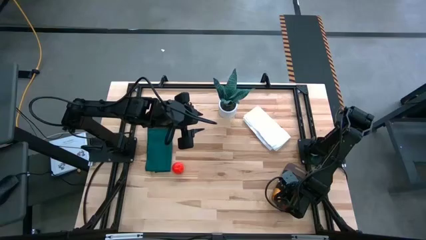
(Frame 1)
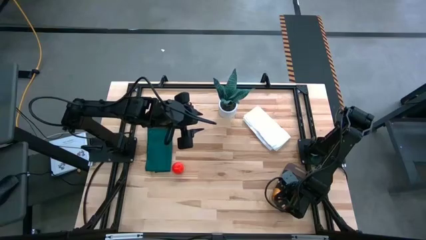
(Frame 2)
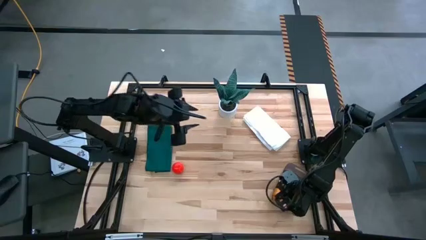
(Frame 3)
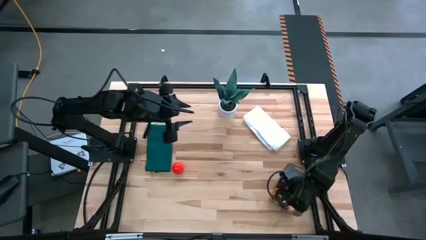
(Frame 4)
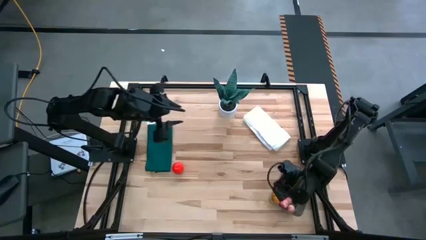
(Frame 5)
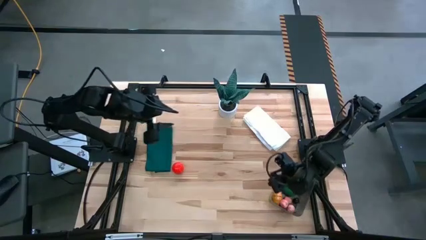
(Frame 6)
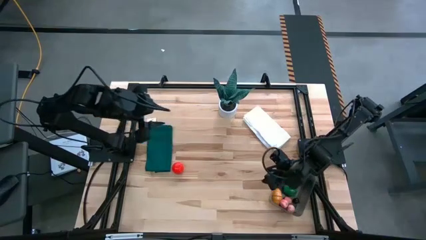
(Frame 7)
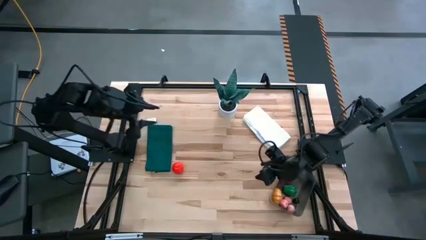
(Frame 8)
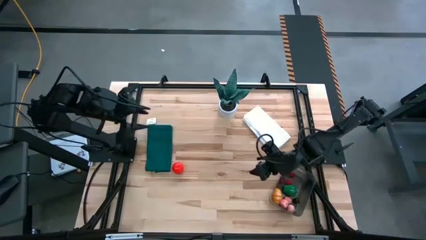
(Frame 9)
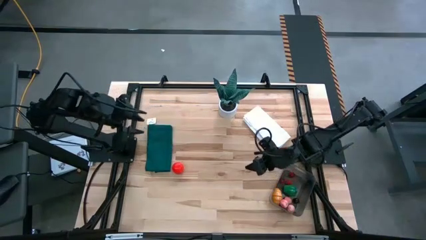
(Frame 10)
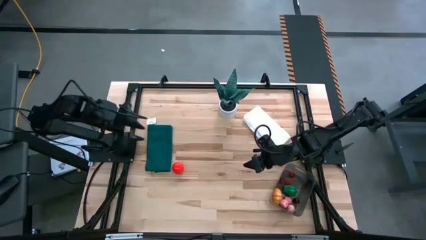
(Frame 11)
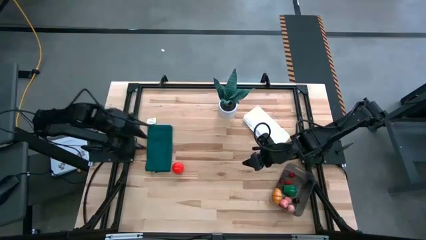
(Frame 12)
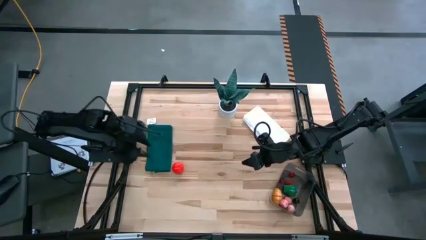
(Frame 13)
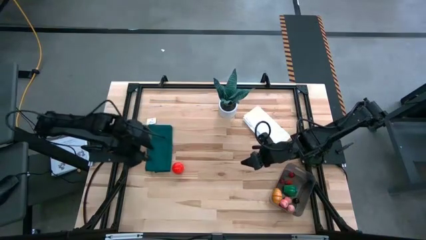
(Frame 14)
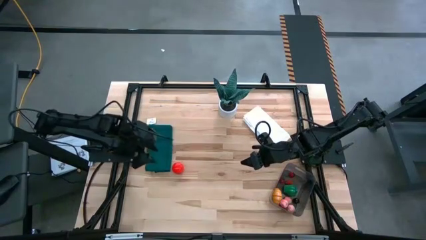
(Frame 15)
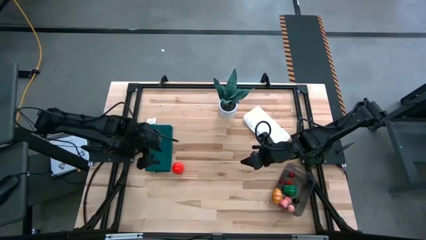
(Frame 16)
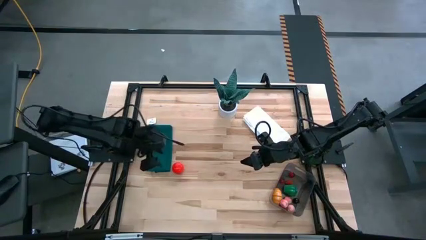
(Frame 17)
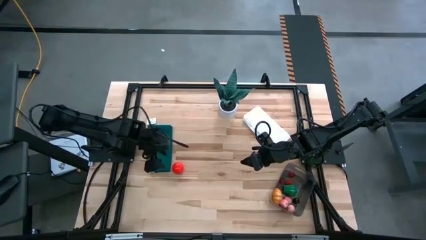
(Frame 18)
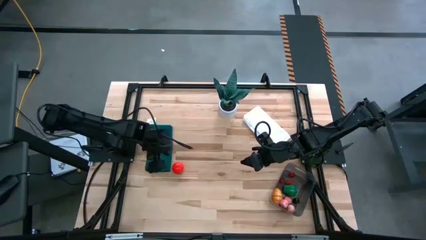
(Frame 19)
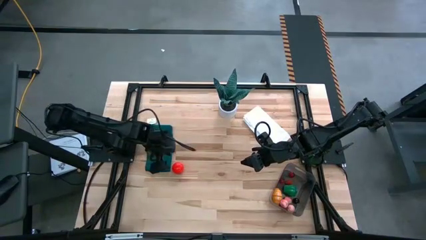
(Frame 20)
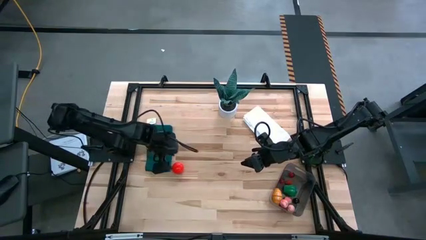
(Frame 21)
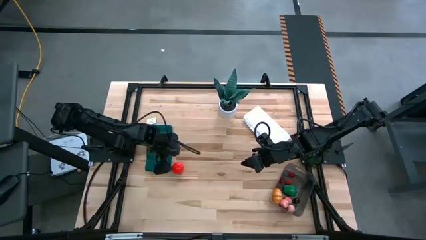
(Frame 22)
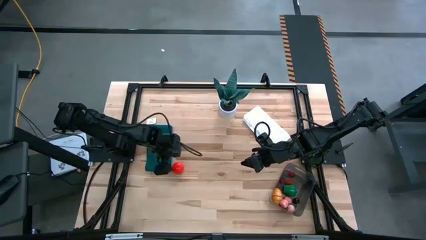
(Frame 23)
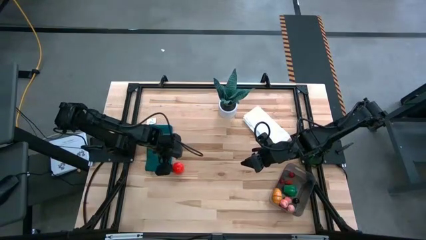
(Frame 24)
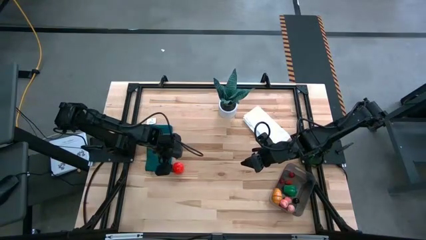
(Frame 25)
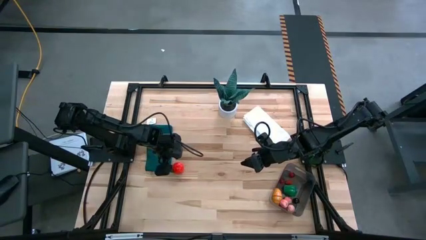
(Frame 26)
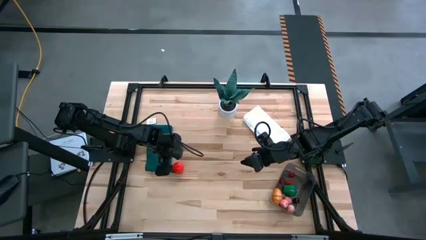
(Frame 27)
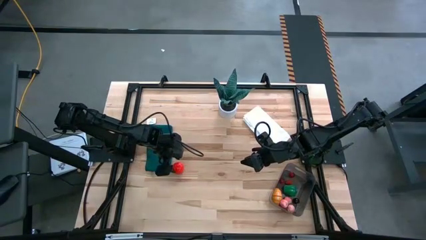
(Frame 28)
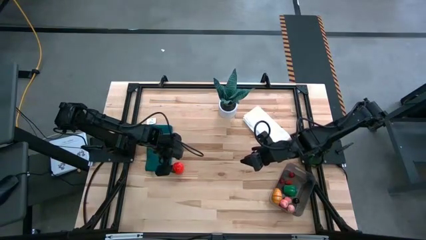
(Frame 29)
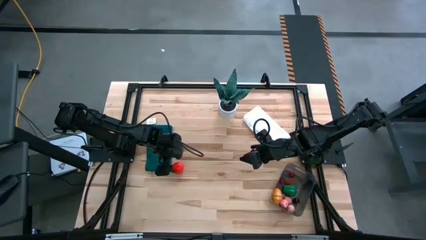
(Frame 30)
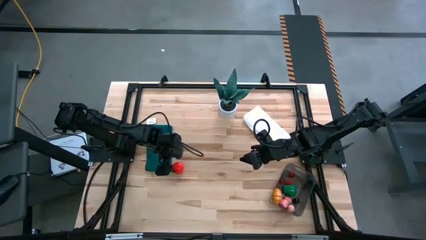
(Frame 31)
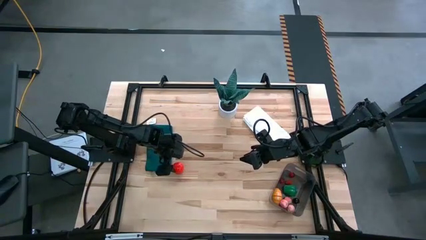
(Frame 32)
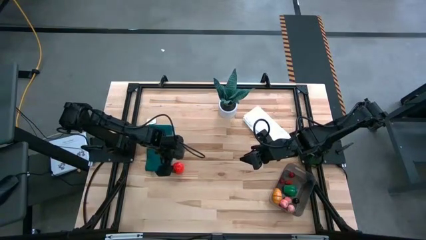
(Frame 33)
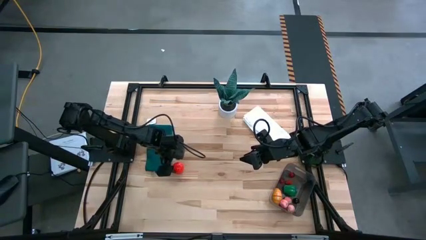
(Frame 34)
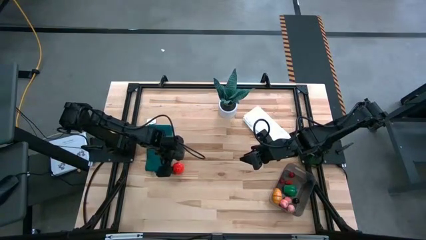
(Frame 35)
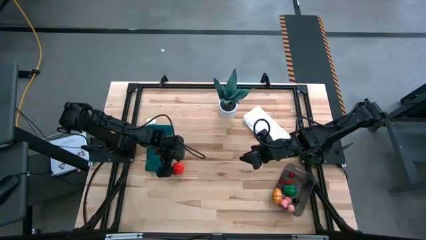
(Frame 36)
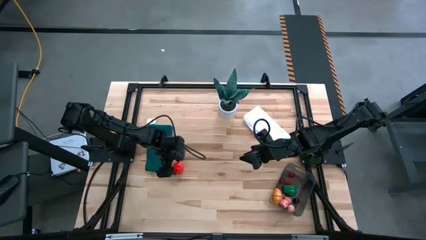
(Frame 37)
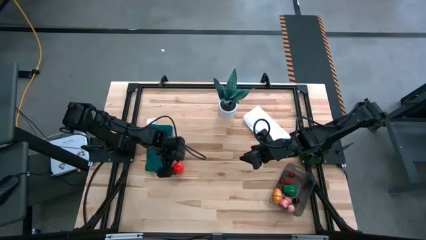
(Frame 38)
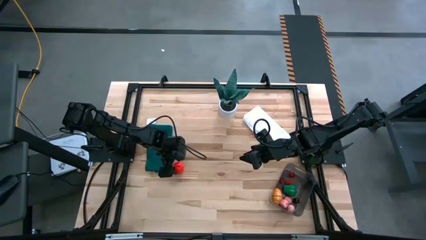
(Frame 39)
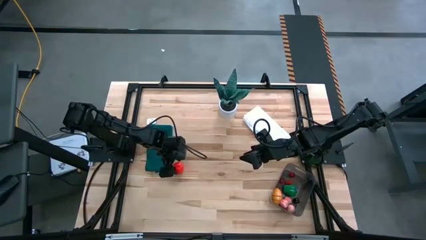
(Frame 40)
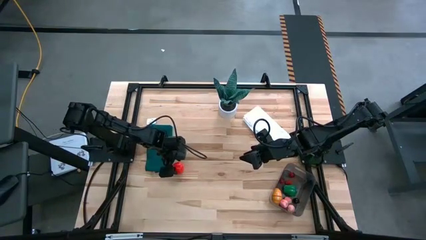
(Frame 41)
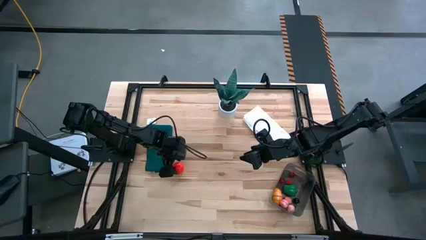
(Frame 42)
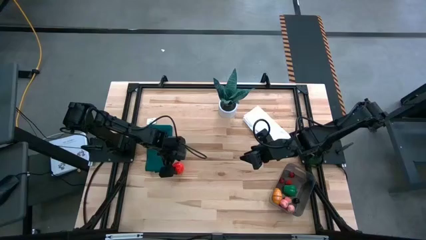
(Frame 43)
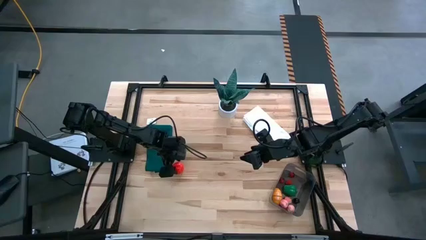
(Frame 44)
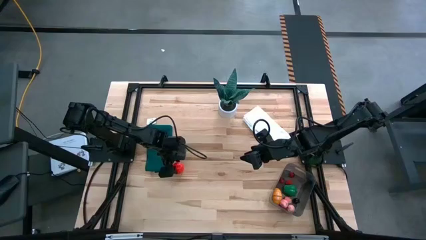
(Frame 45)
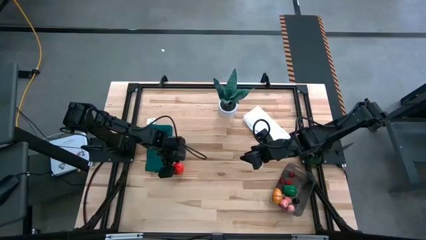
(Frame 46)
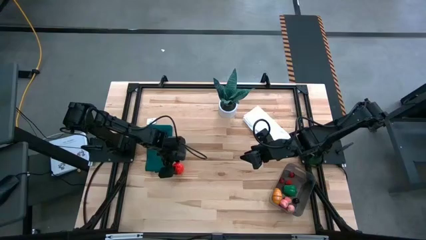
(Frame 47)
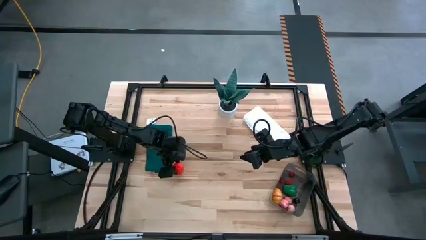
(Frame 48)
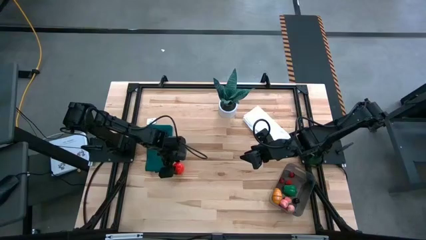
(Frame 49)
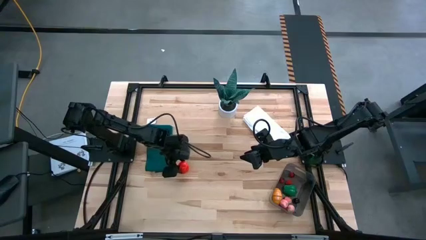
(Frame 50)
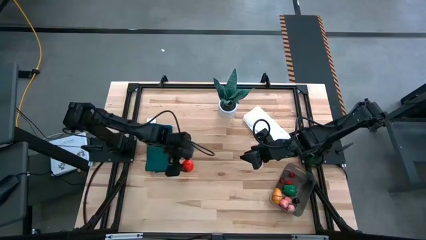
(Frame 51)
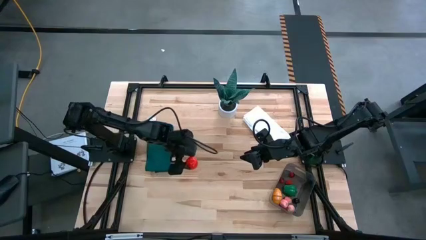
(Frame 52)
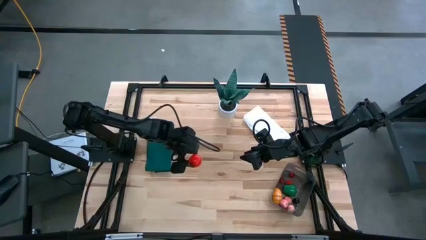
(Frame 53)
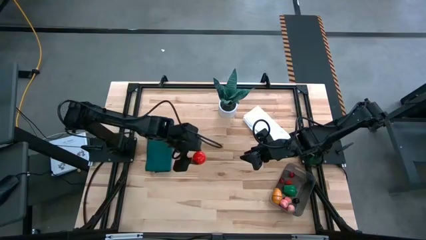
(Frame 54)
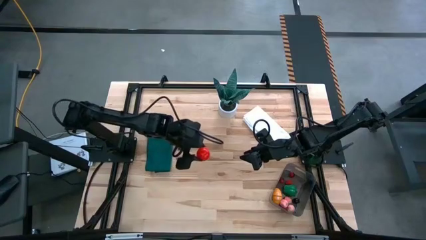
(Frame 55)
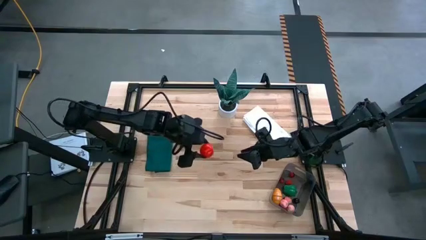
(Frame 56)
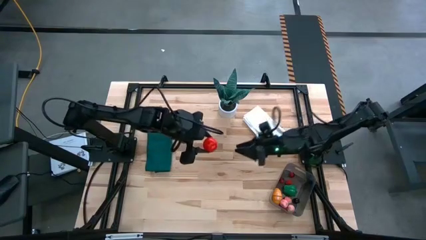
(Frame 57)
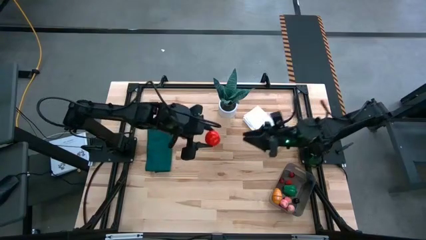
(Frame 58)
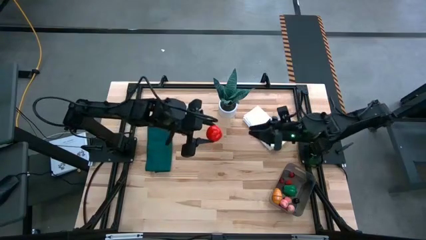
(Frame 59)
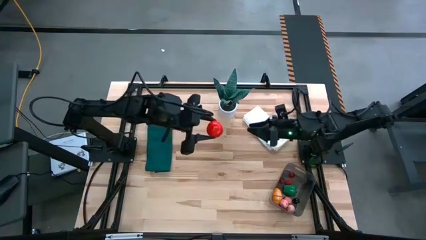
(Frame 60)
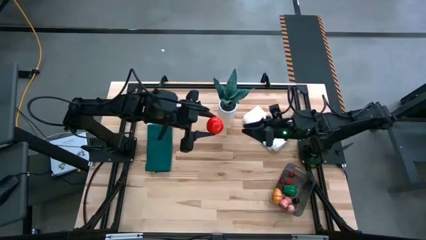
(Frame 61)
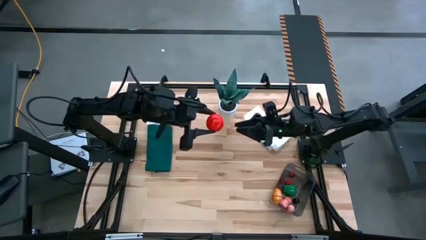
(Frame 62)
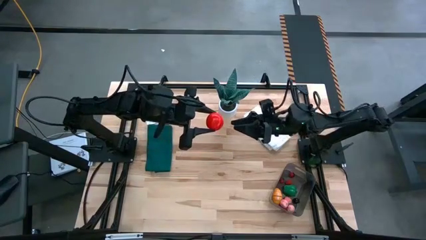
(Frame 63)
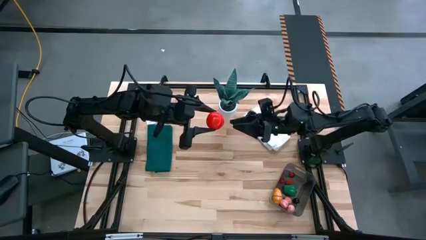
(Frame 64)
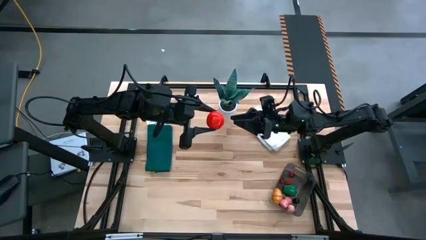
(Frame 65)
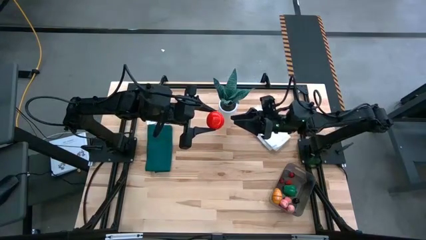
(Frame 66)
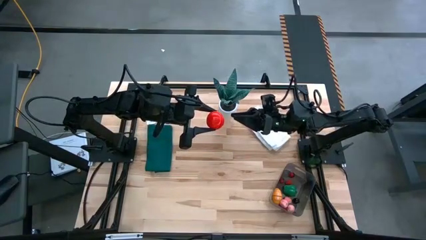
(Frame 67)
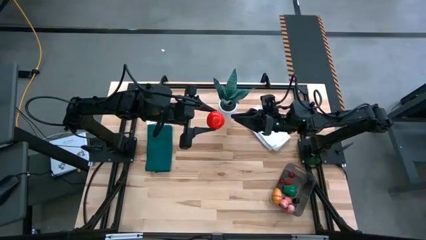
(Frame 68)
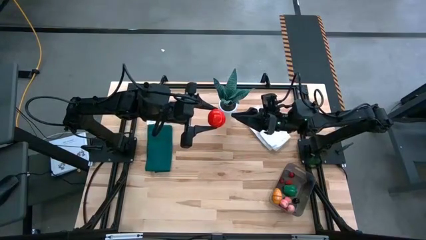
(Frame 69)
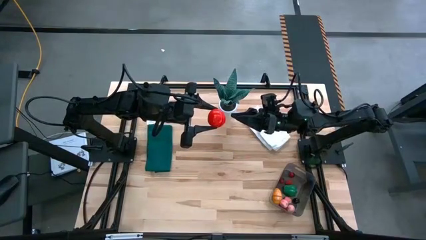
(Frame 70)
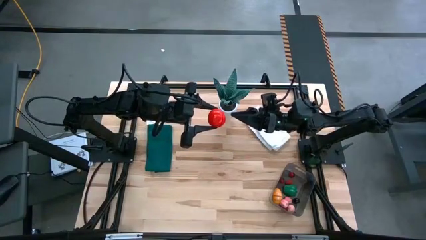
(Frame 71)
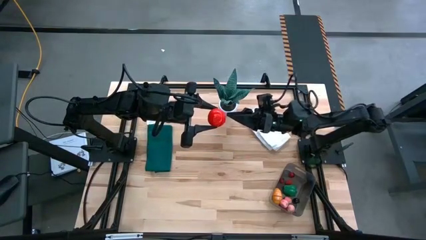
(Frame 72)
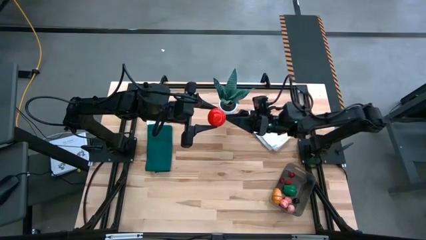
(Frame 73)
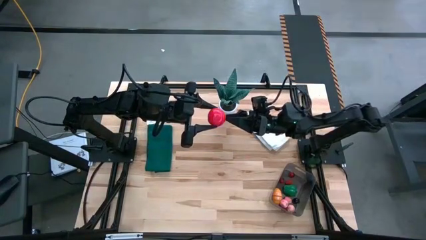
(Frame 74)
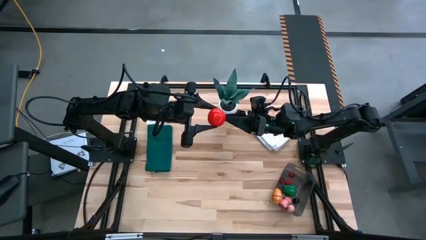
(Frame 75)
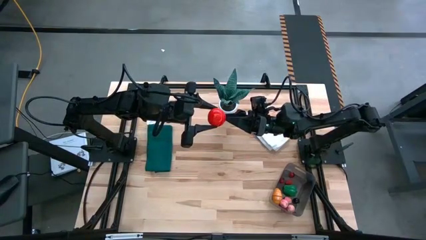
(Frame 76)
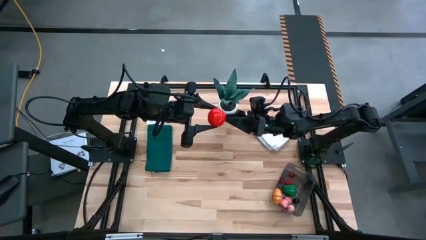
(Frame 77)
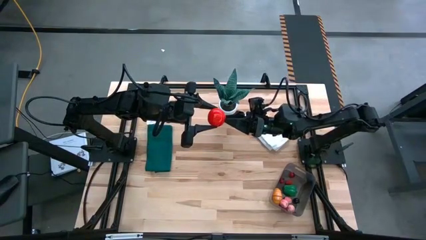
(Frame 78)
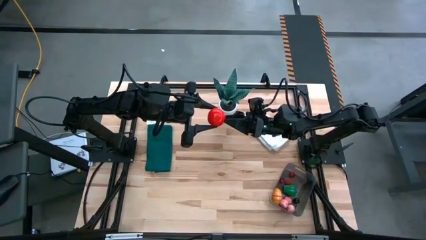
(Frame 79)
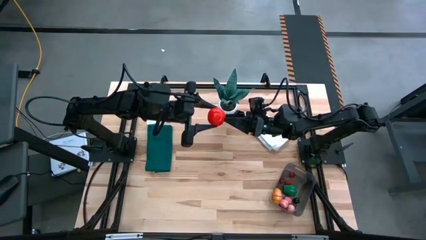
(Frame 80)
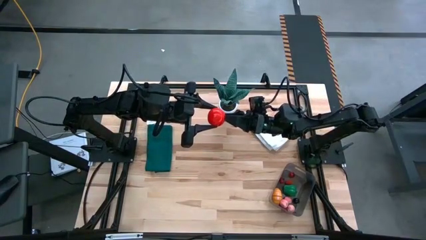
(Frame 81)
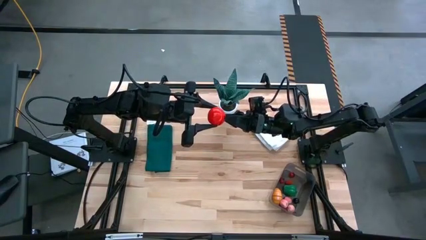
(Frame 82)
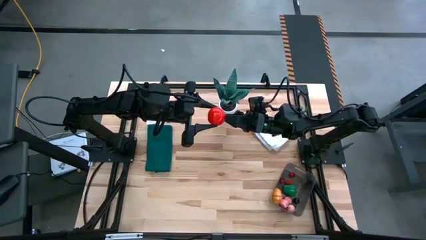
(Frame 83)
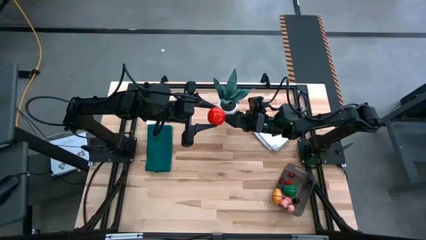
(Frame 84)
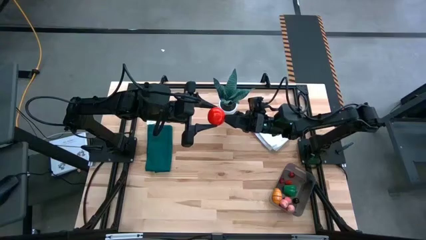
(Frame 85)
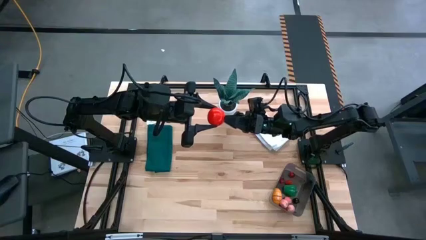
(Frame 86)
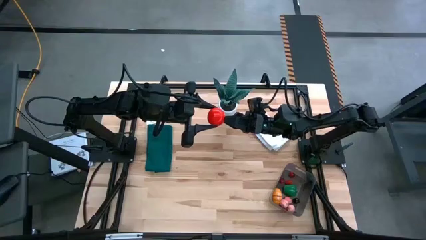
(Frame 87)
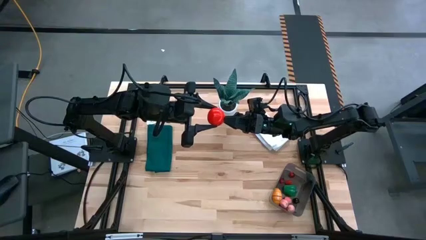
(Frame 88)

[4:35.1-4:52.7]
Task: Pick and placing Produce into tupperware
Put the red tomato into the black bin
